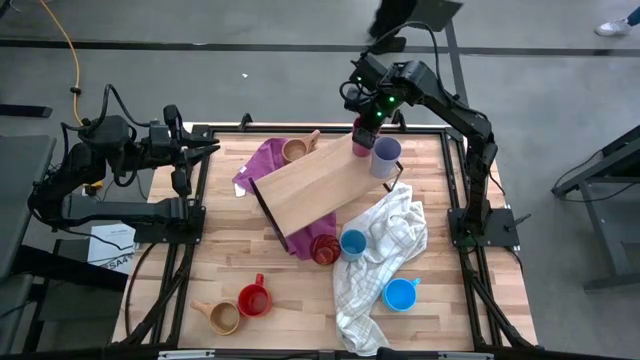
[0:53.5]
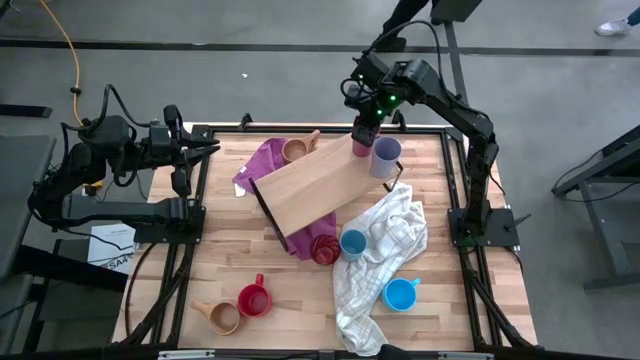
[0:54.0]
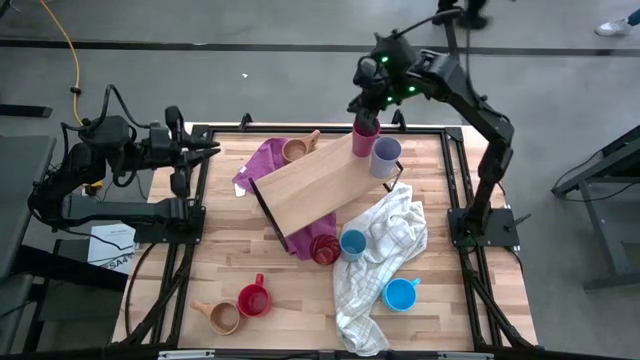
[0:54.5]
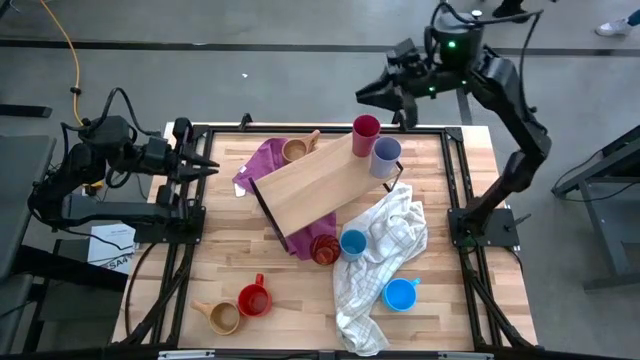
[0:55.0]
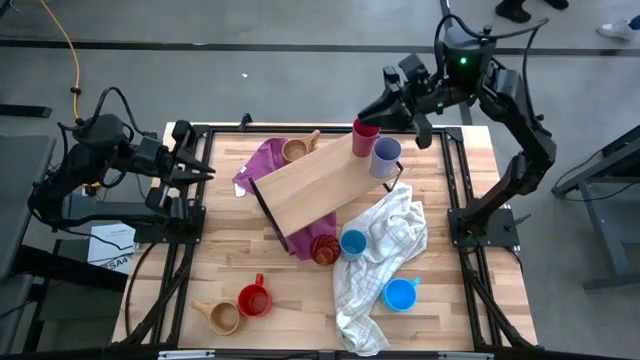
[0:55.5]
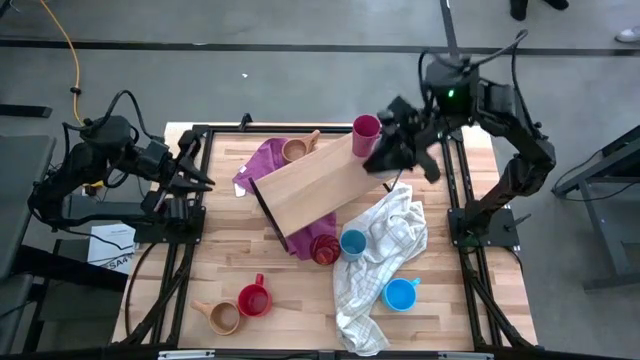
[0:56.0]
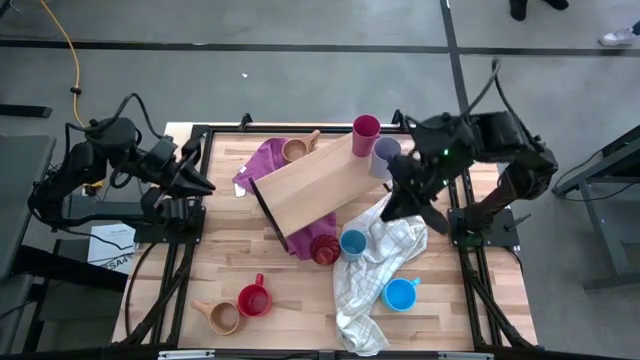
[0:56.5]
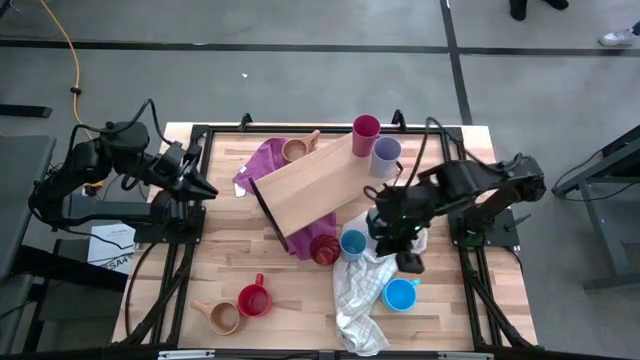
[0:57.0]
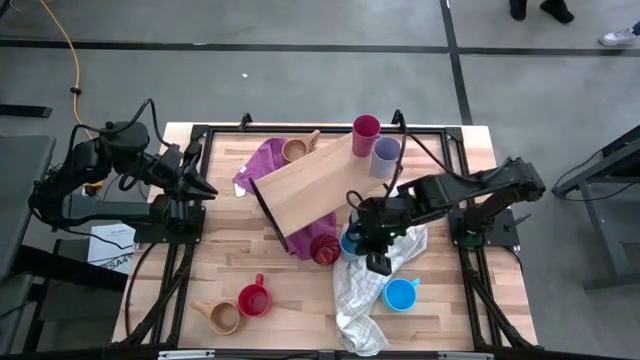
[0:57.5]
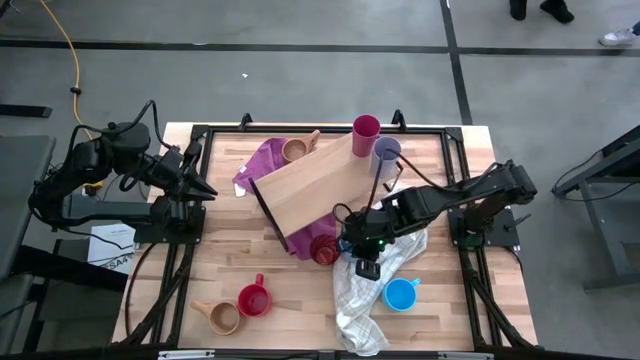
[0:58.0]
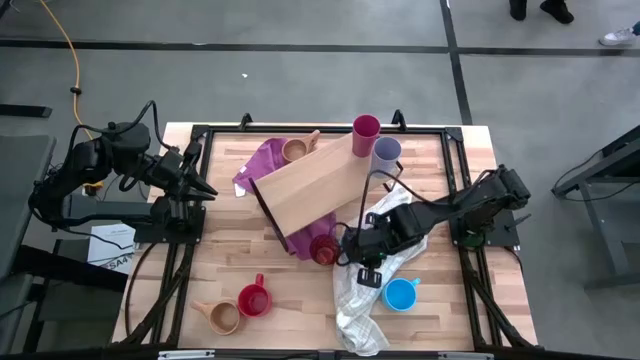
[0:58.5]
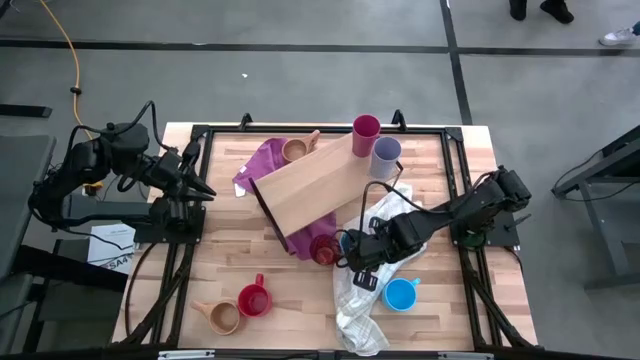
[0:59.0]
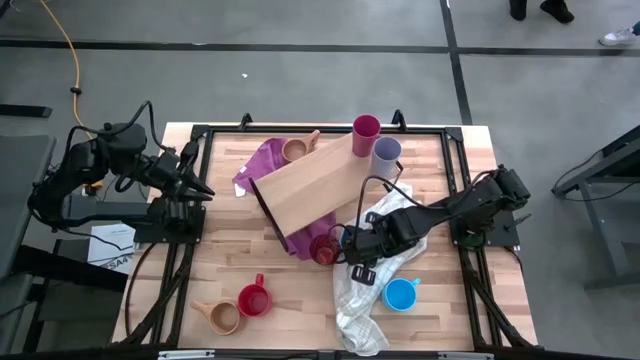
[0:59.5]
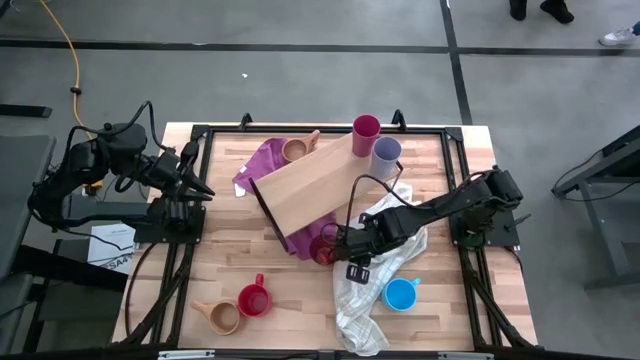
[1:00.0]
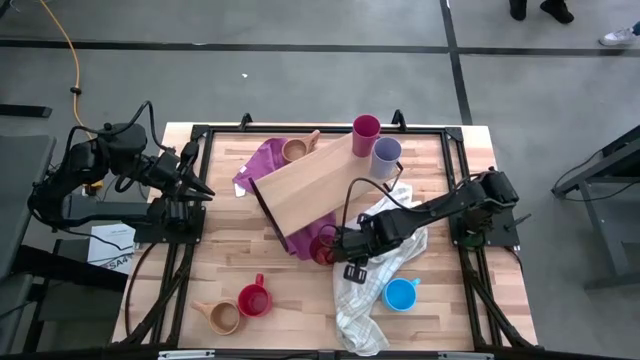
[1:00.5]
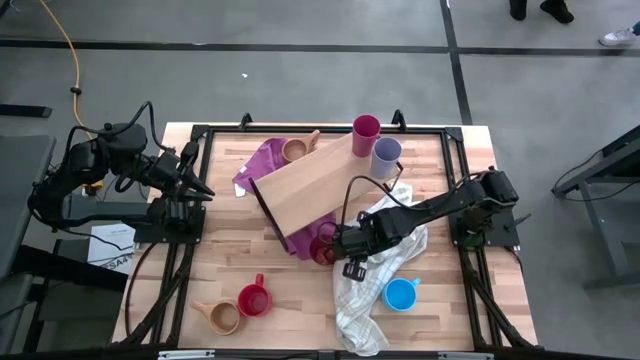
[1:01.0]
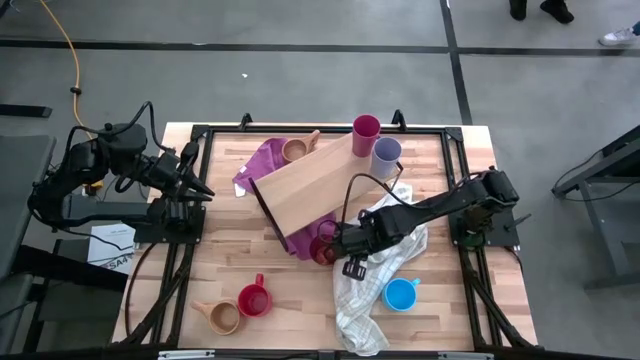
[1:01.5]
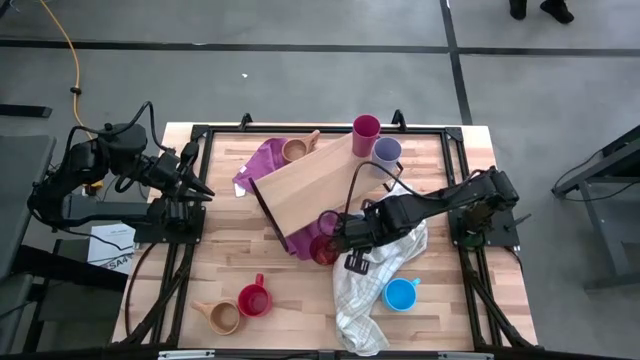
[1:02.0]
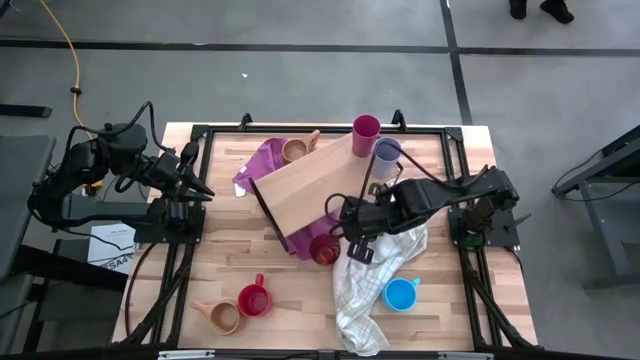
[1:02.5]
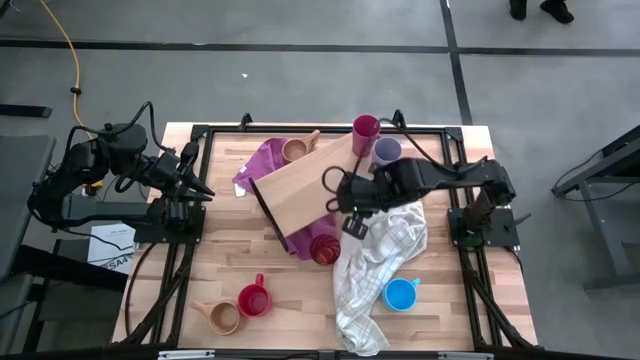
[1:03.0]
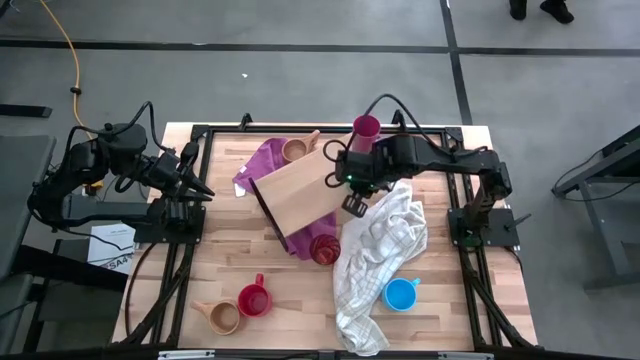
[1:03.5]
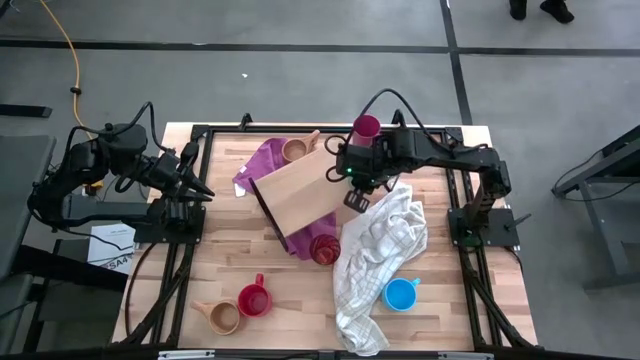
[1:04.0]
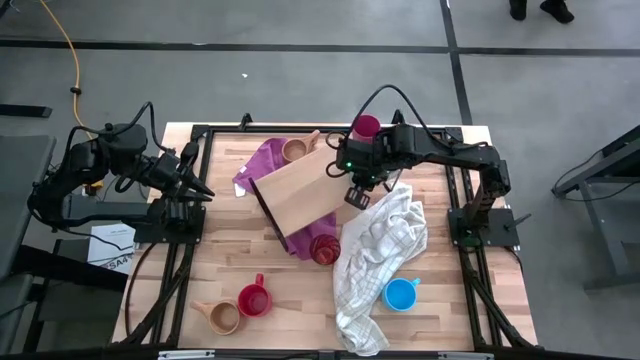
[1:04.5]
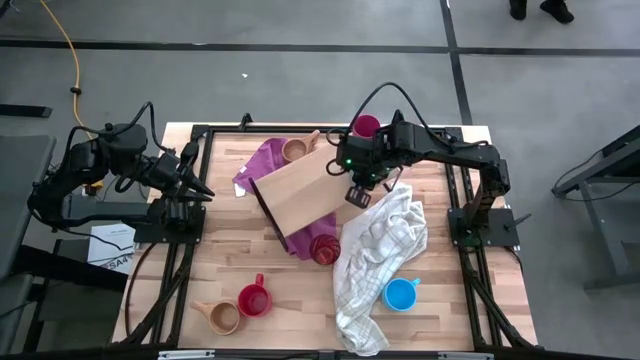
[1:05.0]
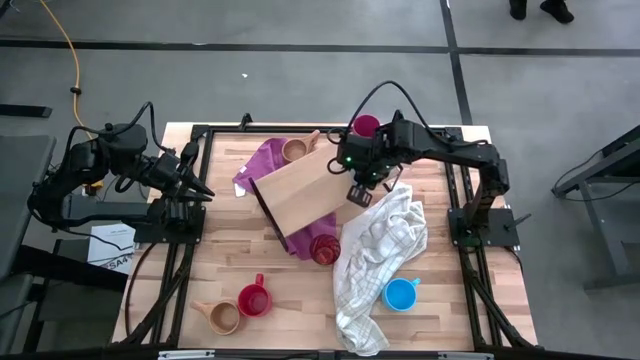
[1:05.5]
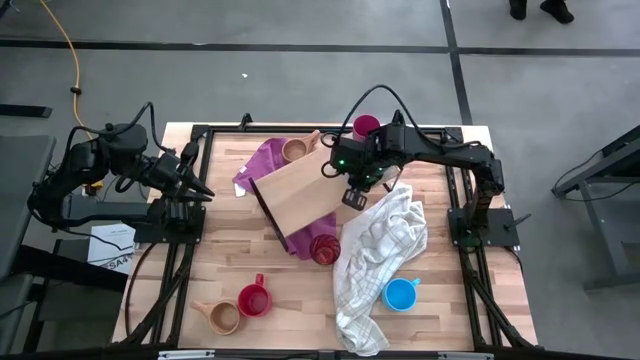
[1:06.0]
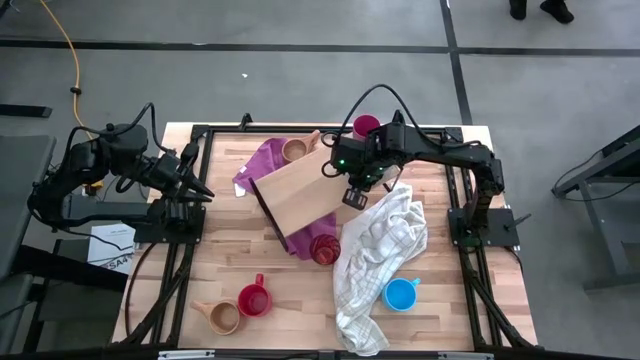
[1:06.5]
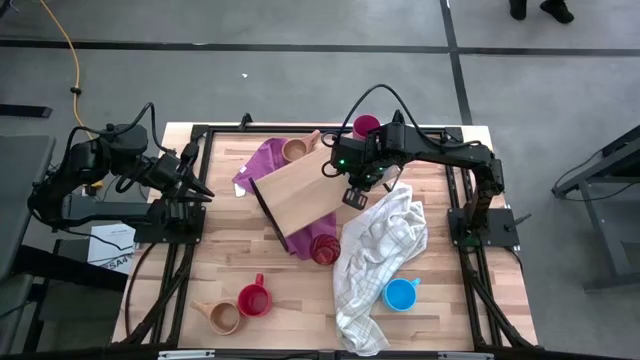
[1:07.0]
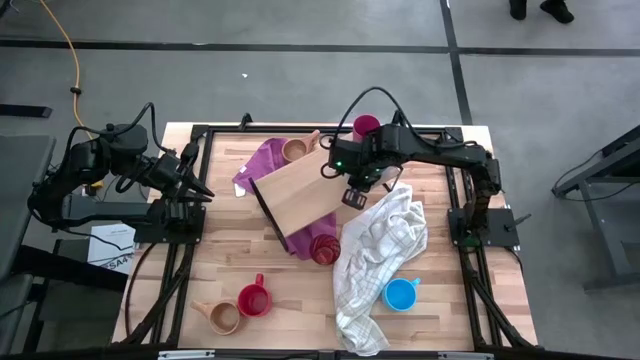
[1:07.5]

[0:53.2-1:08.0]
Task: Stack small to large cups/mugs on shelf
Put the blue cup on the shelf

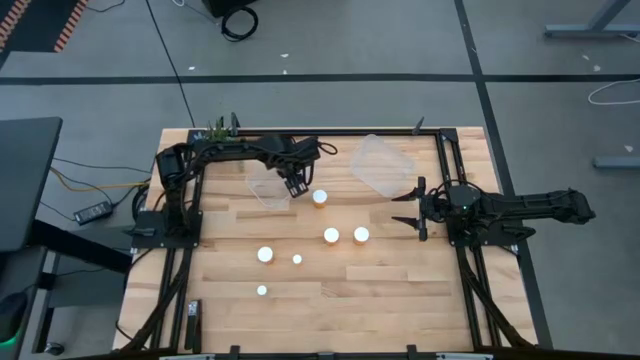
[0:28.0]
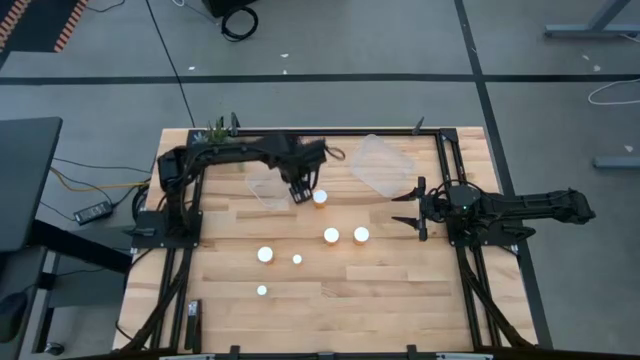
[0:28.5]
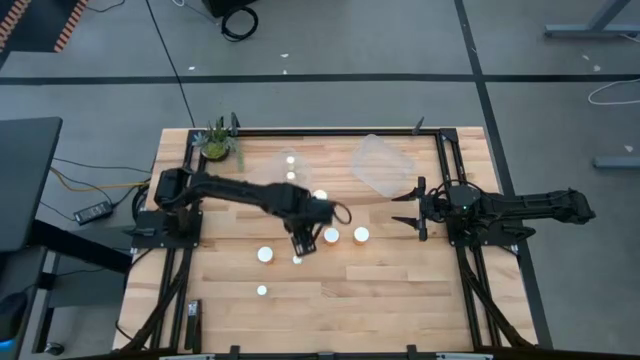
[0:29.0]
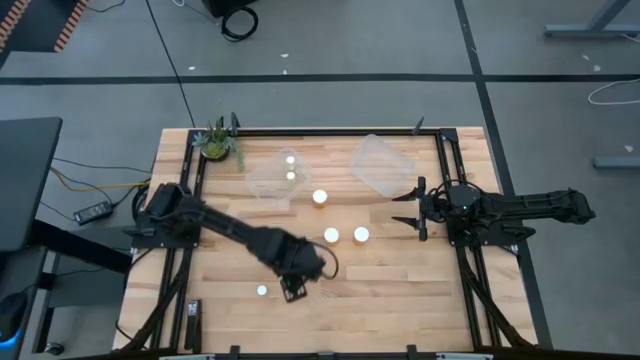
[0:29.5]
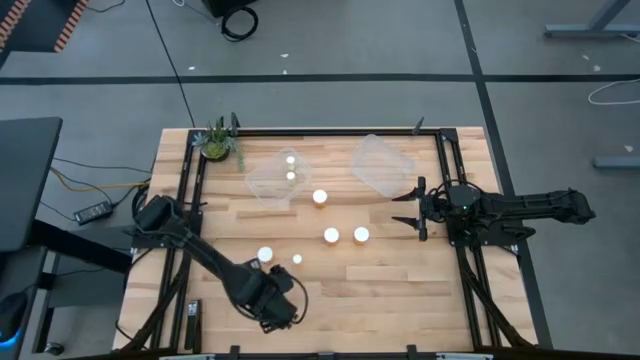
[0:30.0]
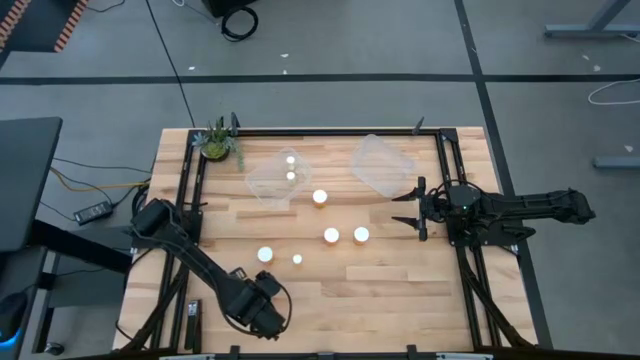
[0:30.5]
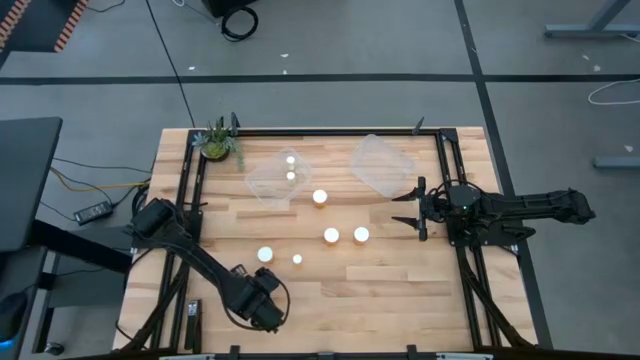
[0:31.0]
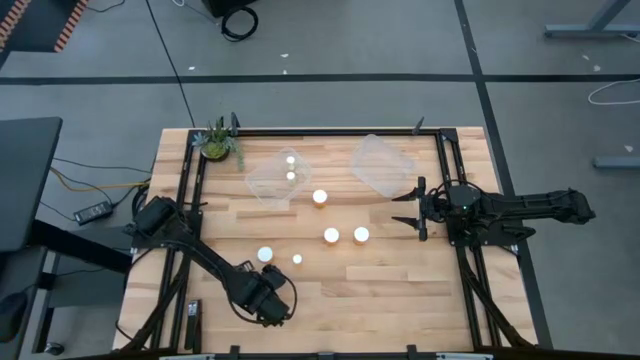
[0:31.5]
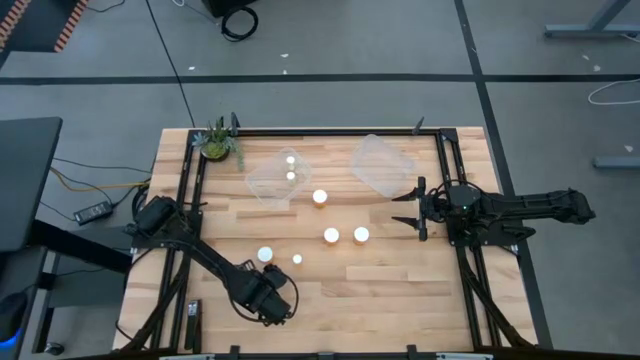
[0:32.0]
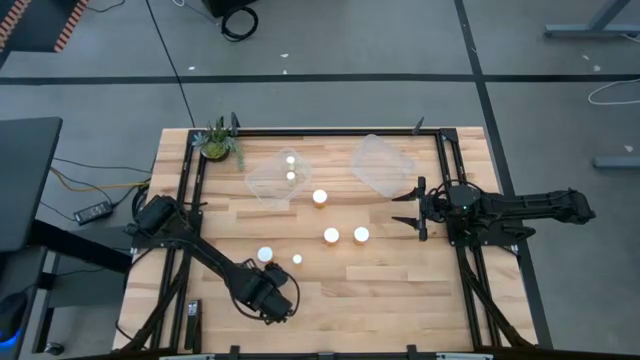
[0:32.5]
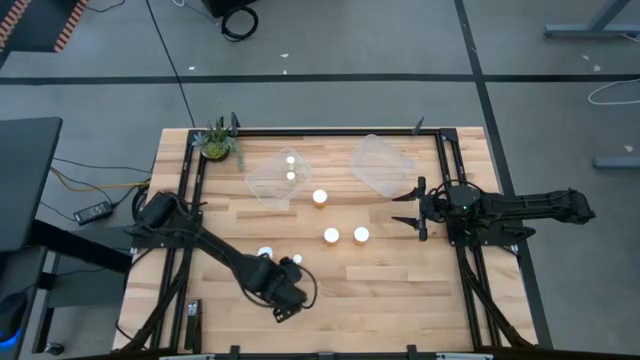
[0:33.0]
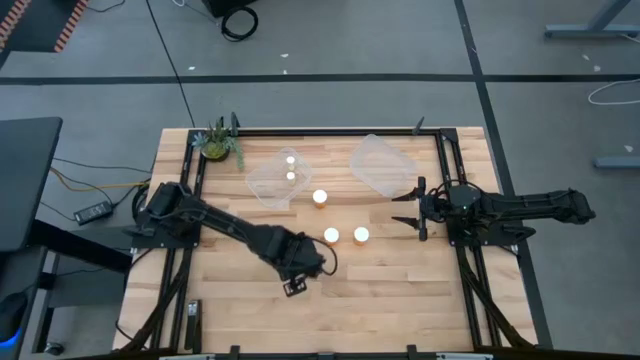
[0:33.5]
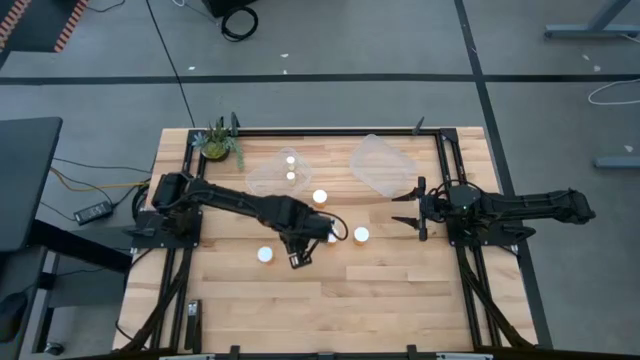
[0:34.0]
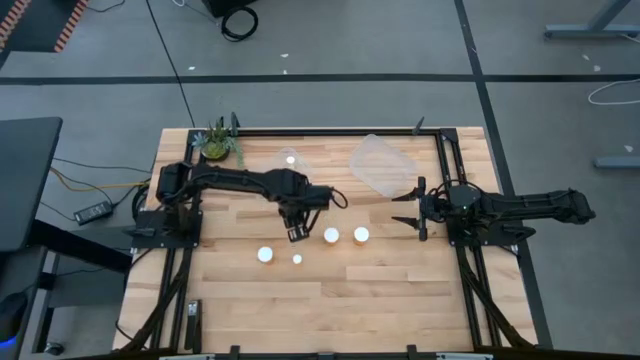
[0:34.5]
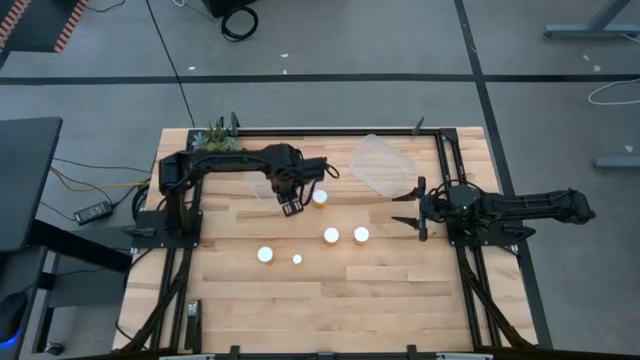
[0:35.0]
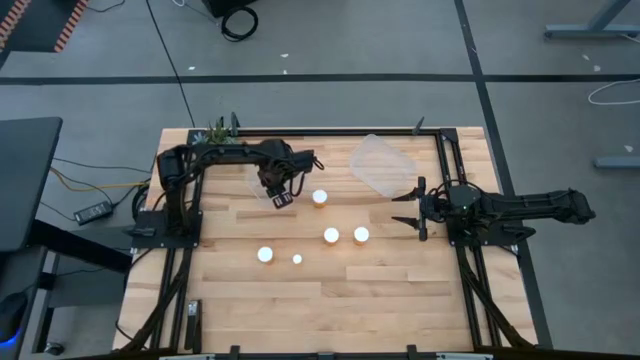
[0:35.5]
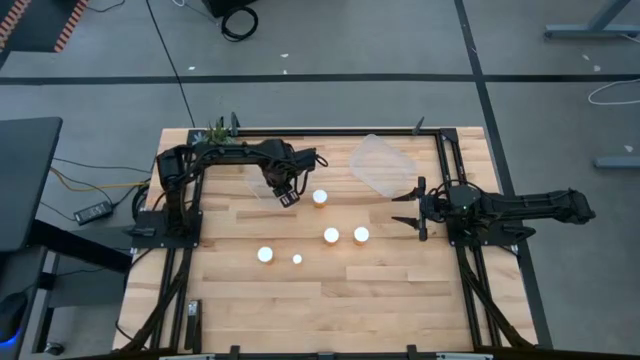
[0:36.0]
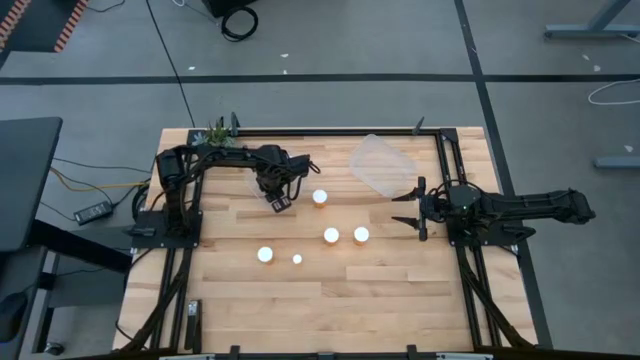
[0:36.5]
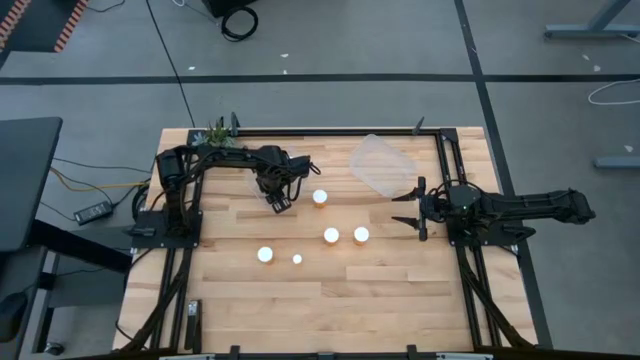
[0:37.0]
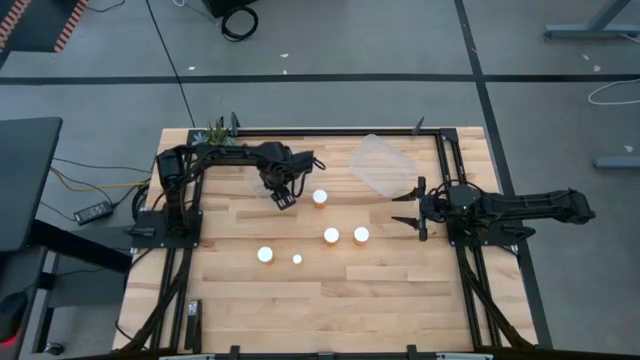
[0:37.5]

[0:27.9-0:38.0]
Task: Pick and place medicine bottles into bin by pill shape (circle, oval)
Put the small yellow pill bottle into the left transparent bin
